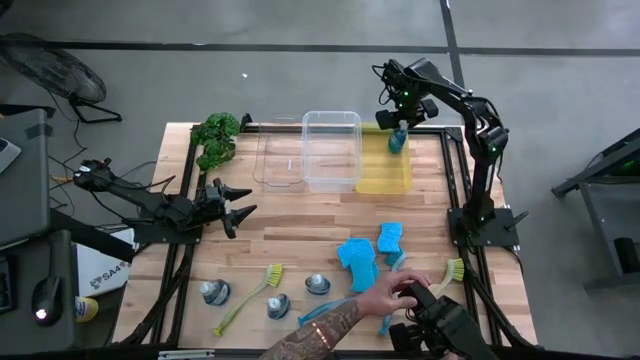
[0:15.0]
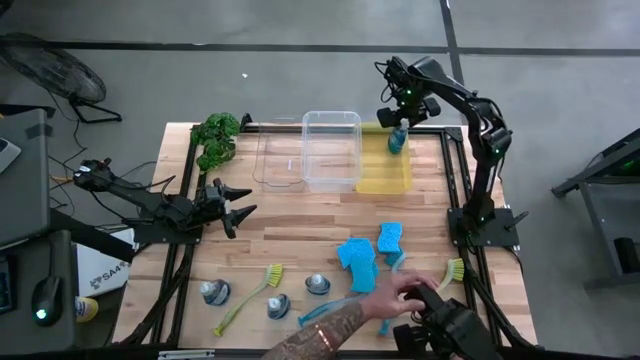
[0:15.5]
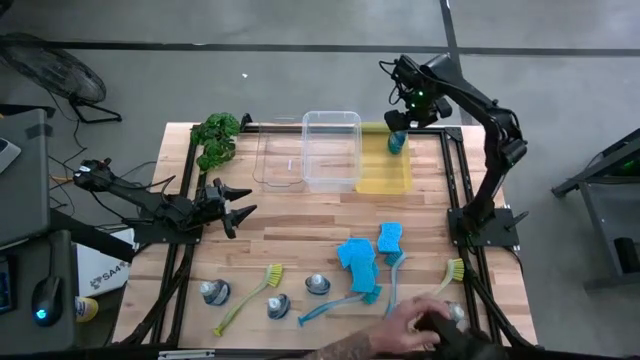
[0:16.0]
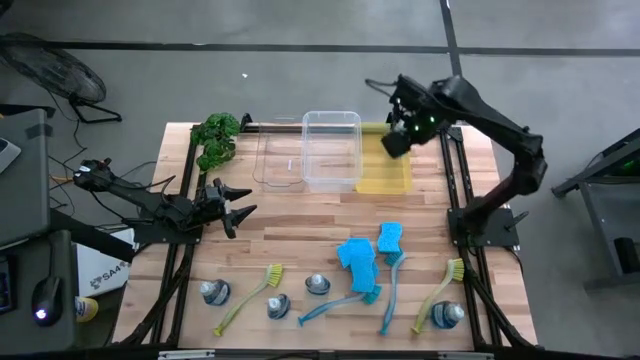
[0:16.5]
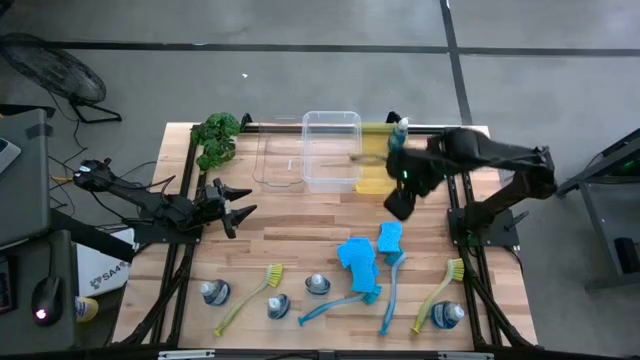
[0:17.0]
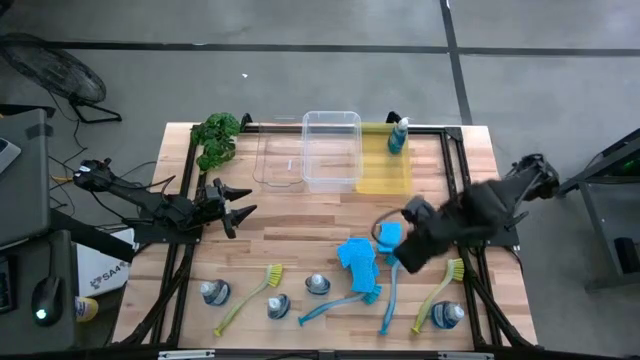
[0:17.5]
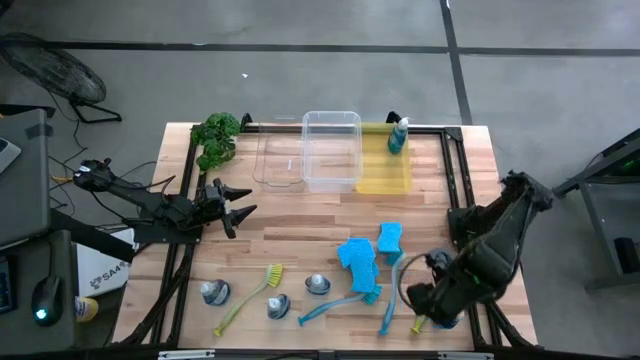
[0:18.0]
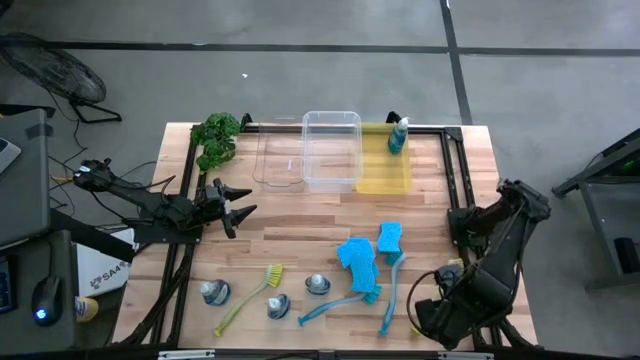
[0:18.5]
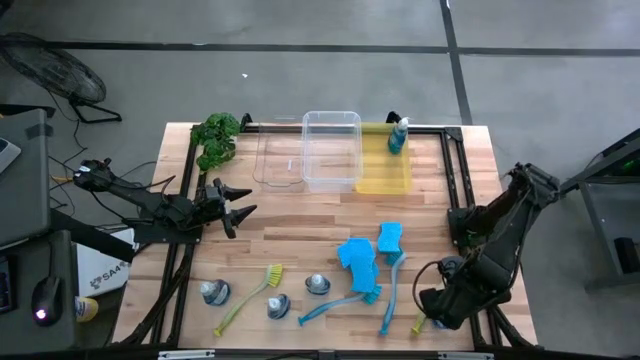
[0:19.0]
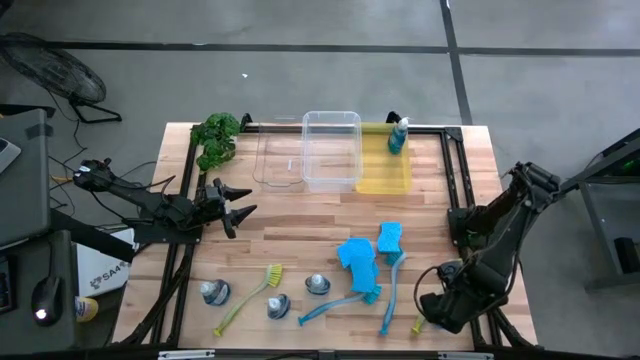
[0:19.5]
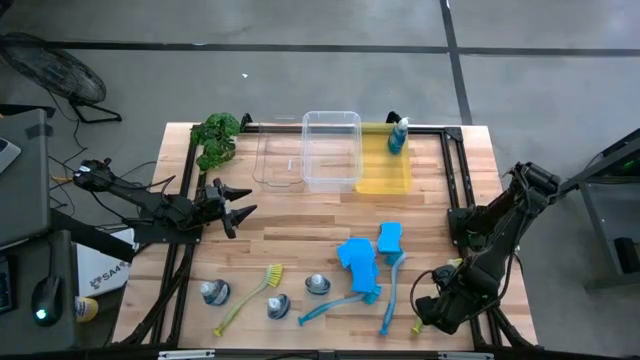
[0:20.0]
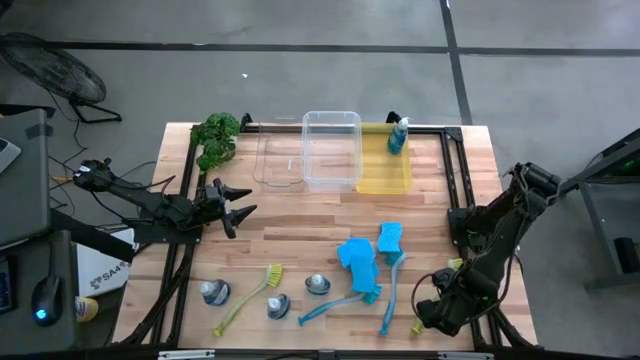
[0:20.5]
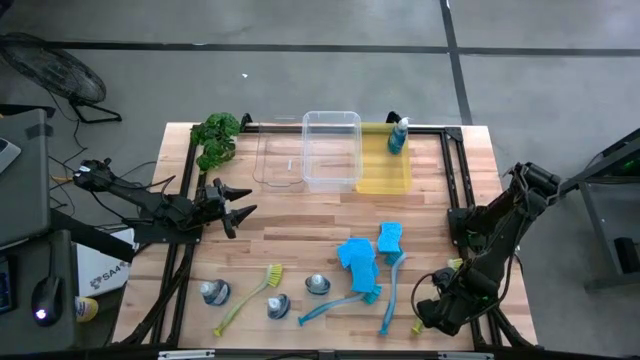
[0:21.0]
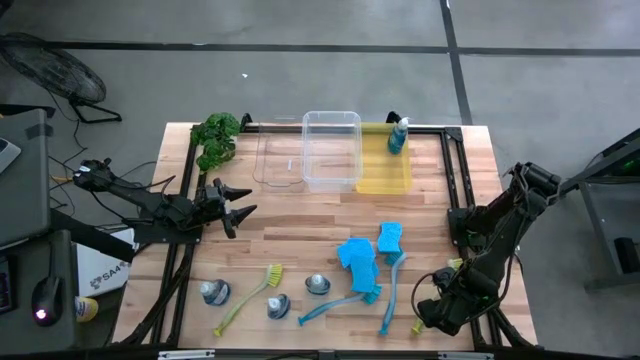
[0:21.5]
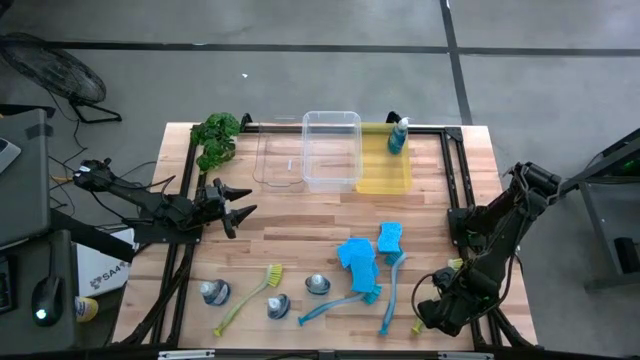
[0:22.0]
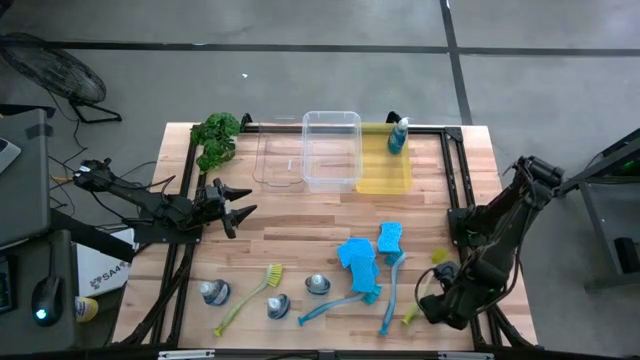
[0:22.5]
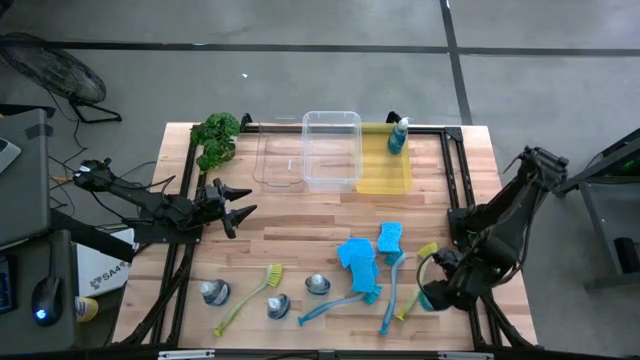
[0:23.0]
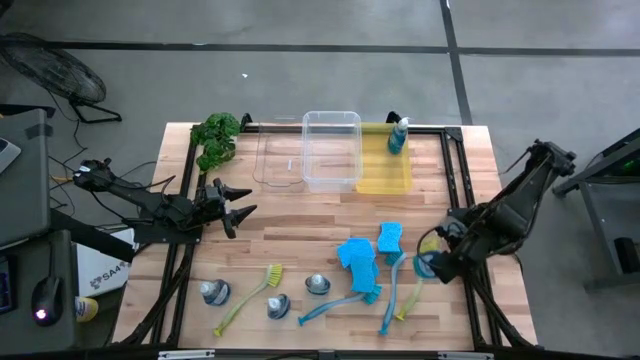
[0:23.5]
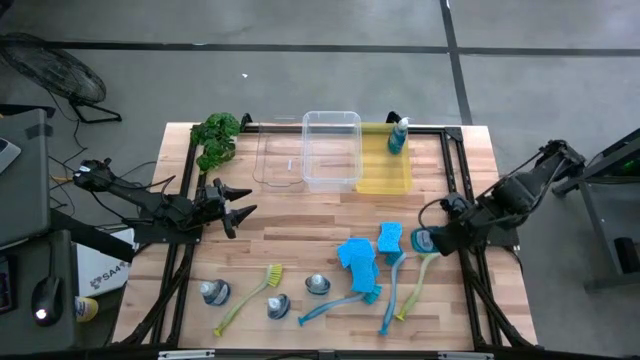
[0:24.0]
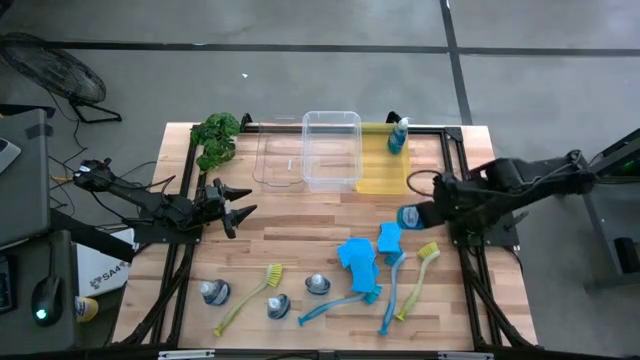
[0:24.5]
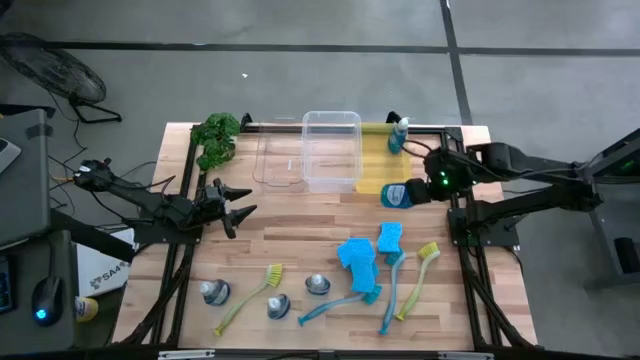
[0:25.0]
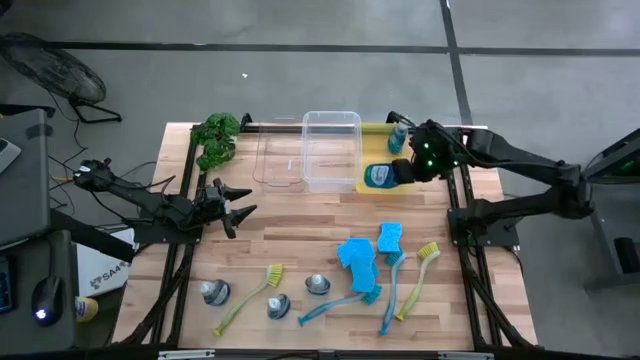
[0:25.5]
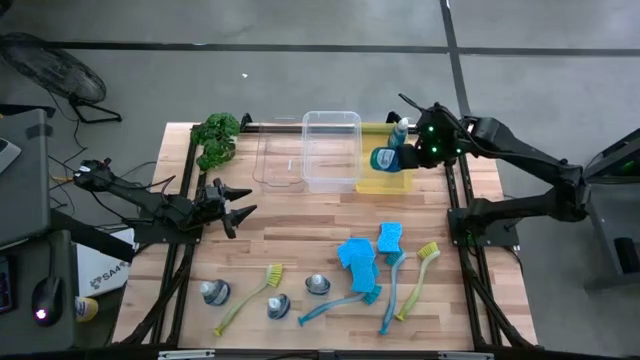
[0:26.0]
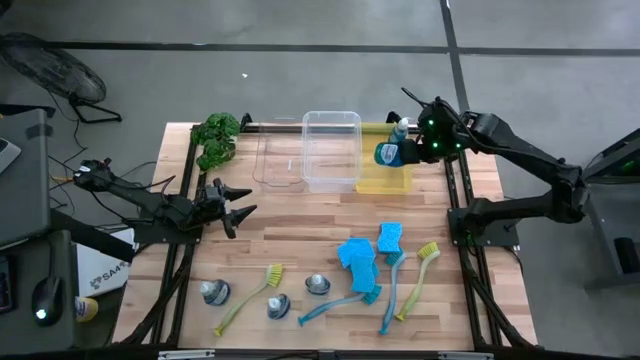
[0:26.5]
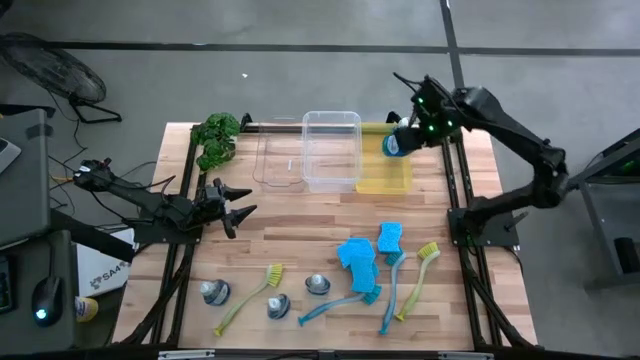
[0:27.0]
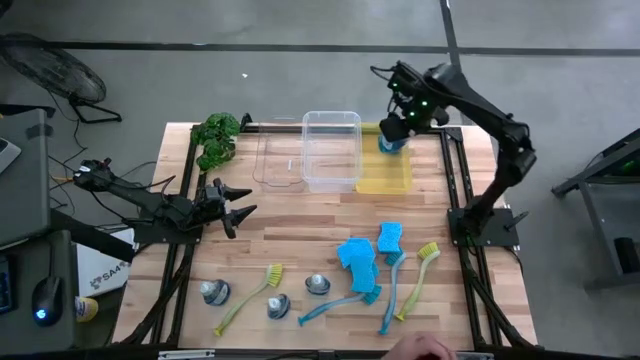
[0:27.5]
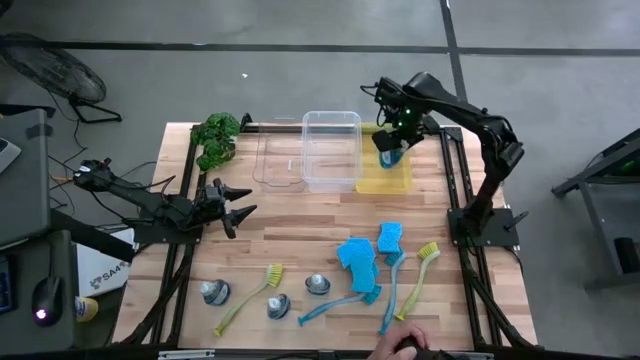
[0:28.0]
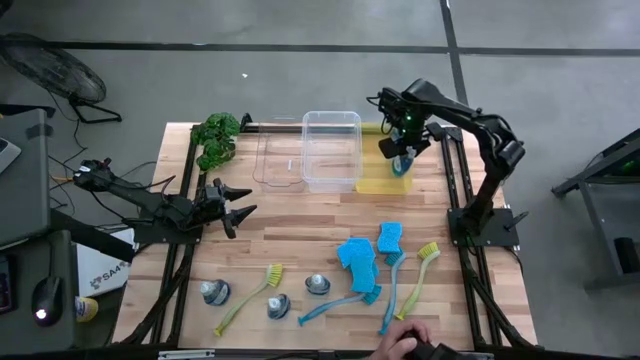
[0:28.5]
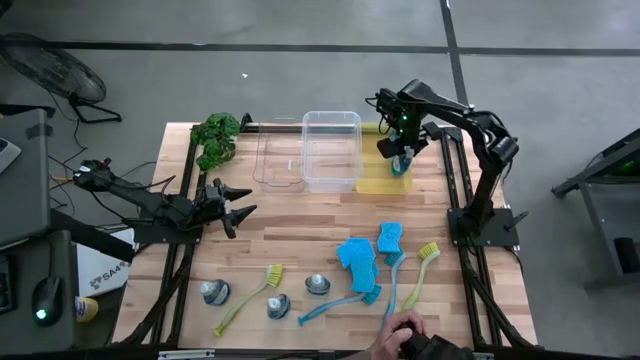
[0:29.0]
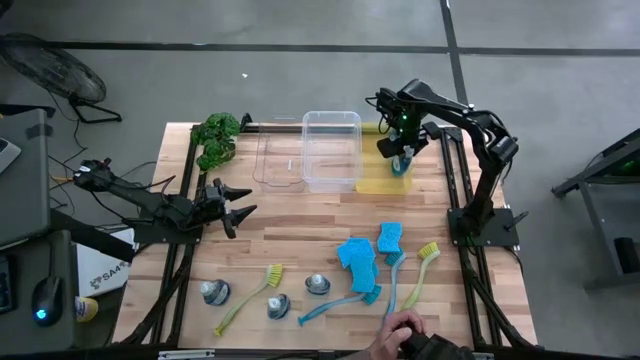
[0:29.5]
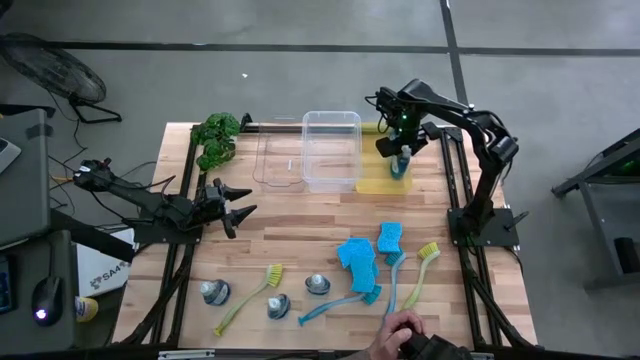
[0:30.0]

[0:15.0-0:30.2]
Task: Pick & Place Kitchen Sink Supplies
Put the dishwashing liquid into the yellow bin

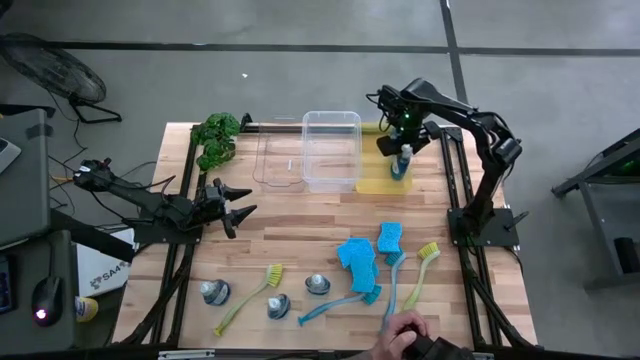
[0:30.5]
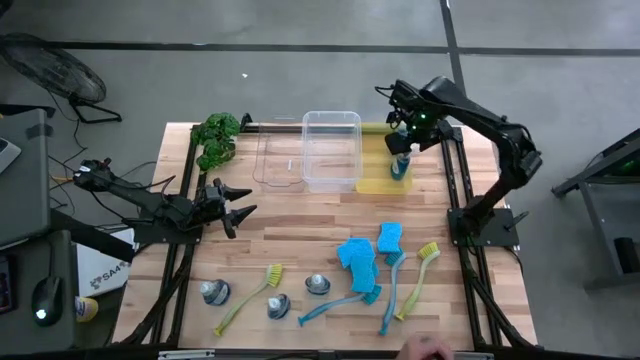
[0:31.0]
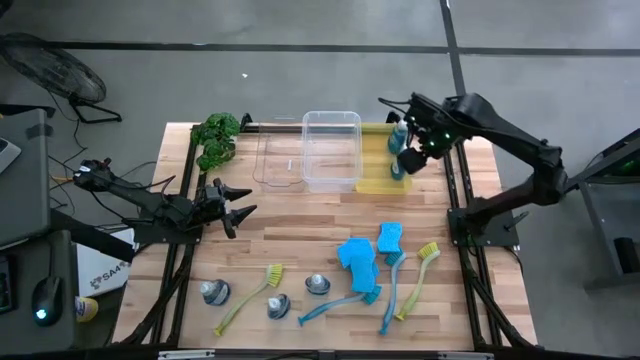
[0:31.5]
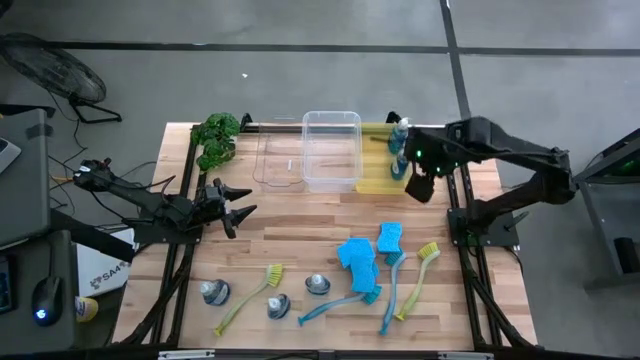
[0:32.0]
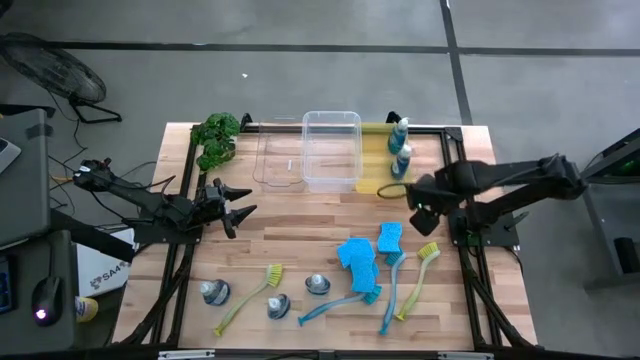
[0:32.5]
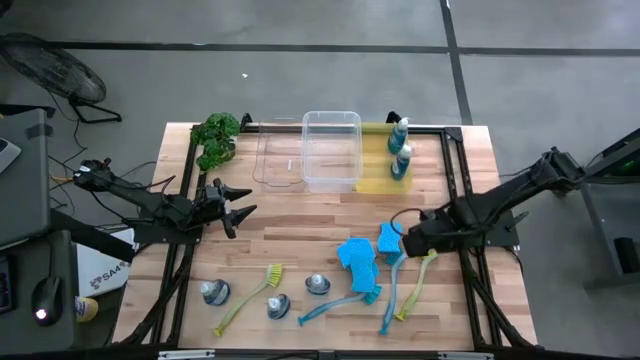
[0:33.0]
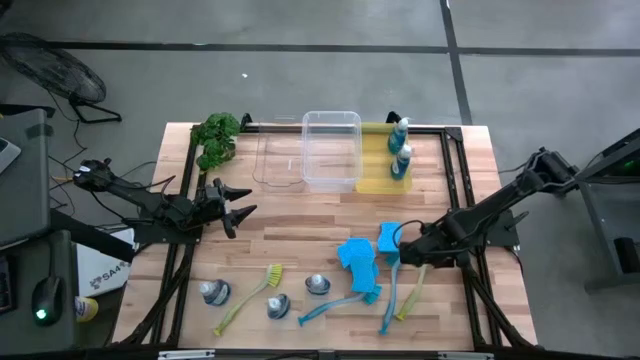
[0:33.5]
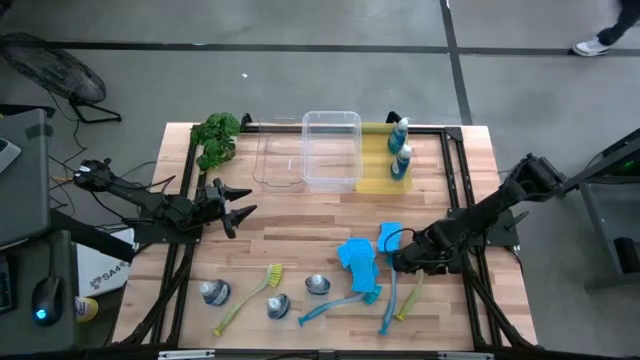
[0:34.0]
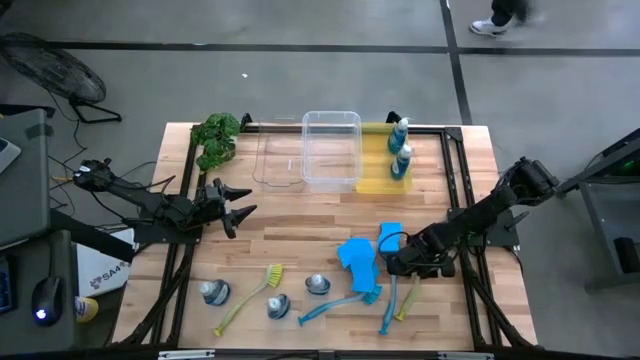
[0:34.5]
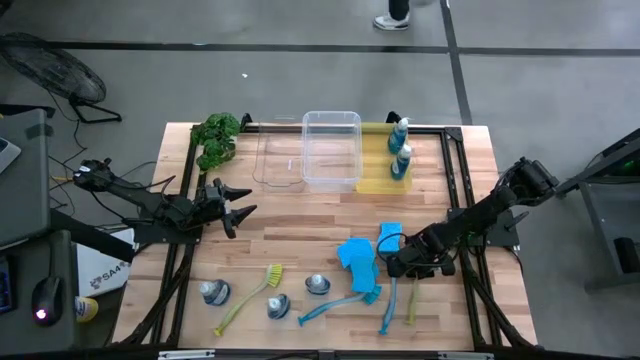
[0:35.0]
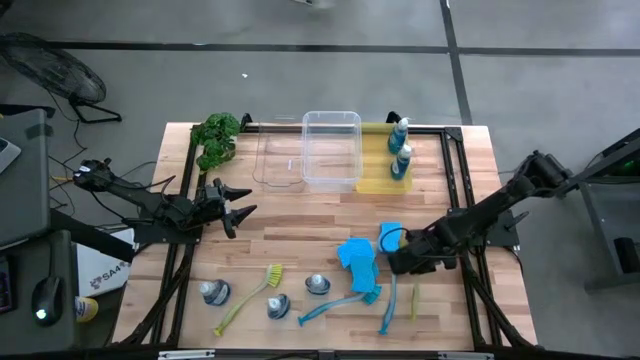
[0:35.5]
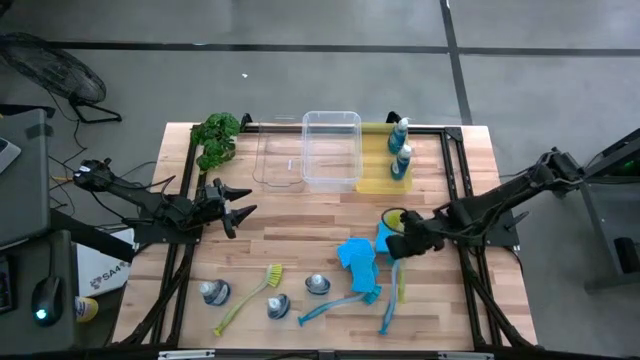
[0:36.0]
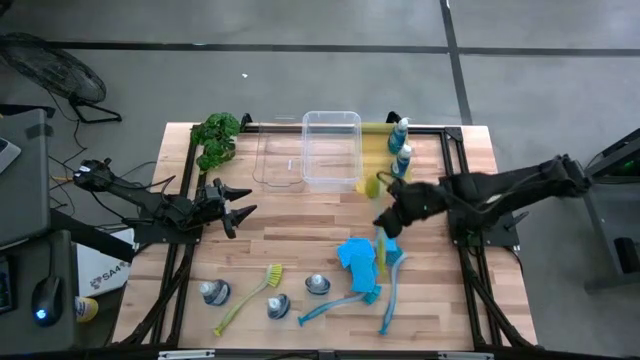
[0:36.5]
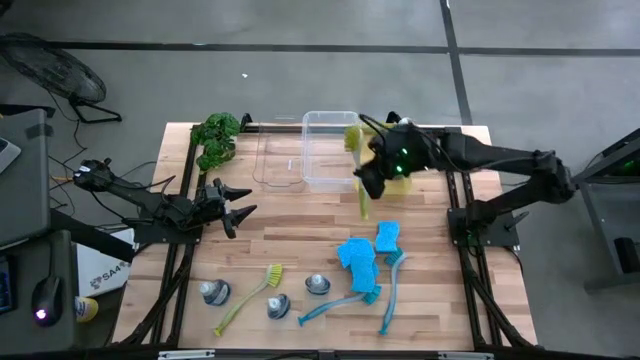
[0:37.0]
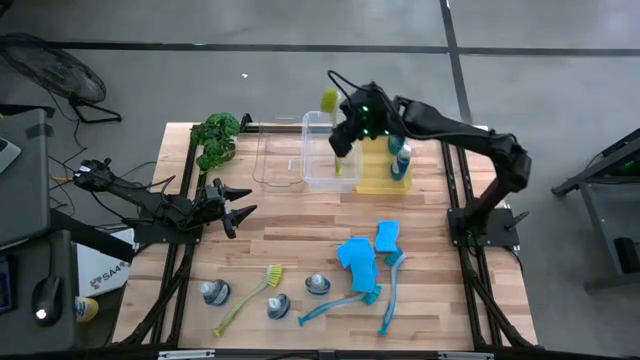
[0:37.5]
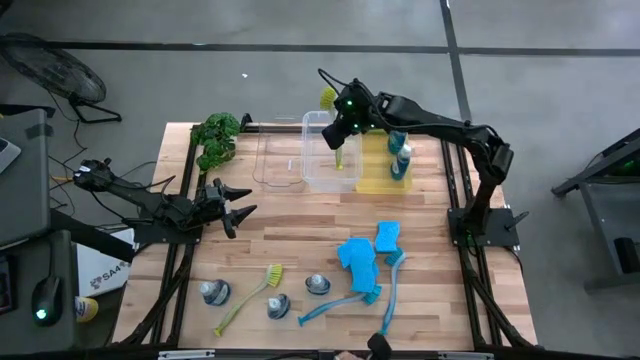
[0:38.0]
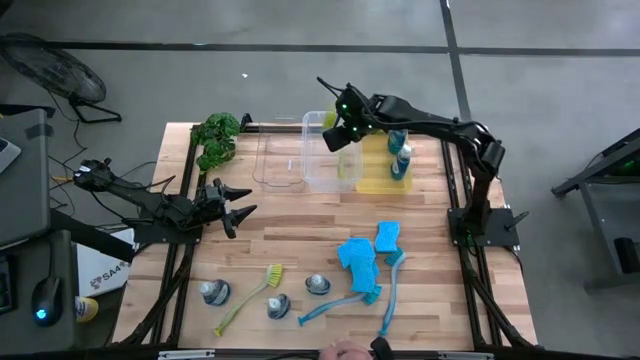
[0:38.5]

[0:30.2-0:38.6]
Put the yellow dishwashing brush into the white bin
